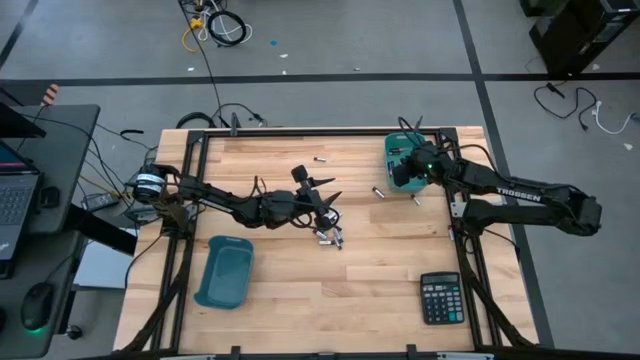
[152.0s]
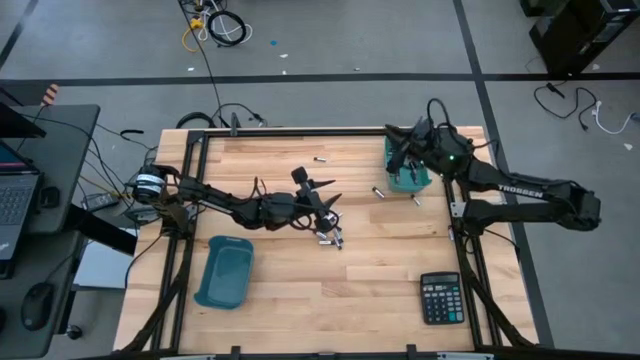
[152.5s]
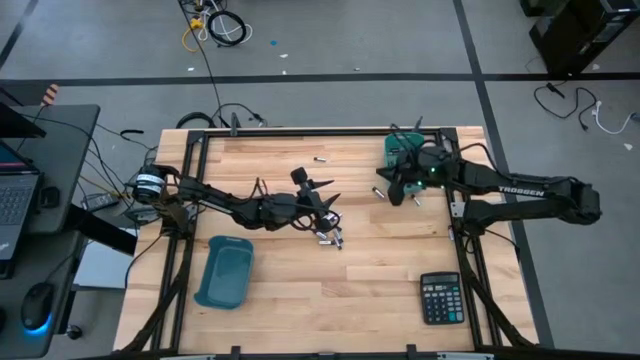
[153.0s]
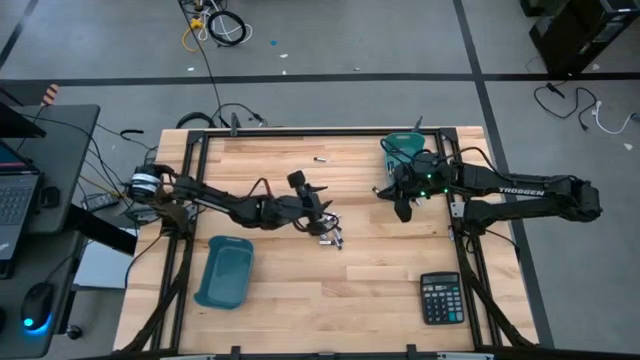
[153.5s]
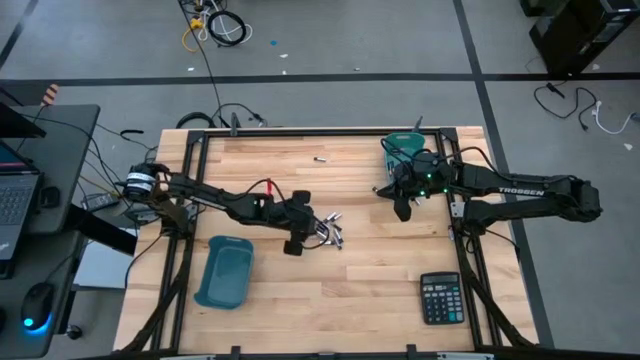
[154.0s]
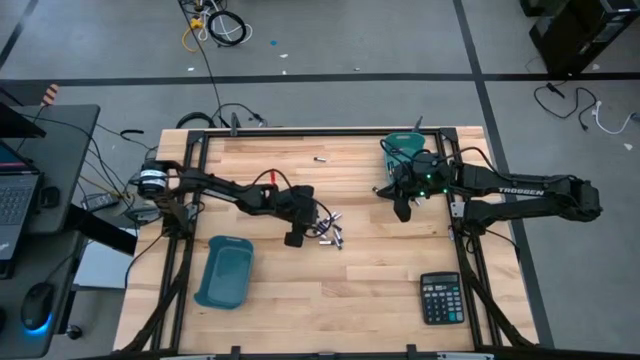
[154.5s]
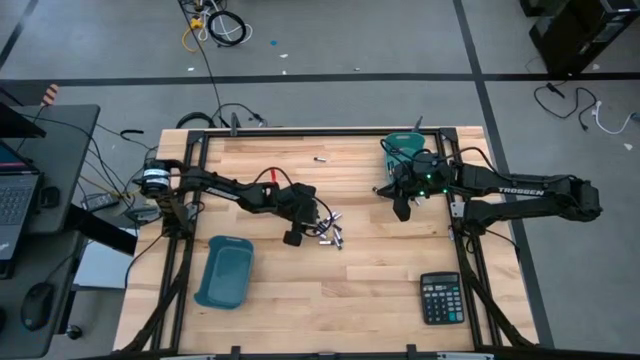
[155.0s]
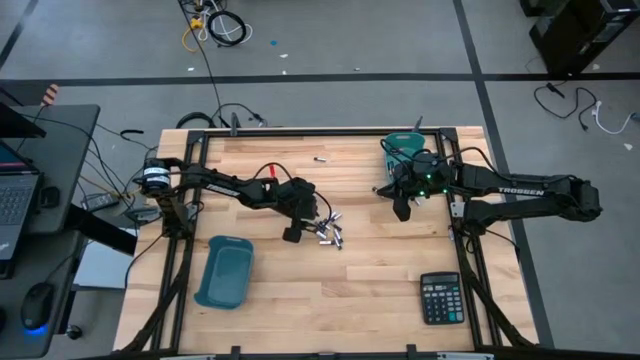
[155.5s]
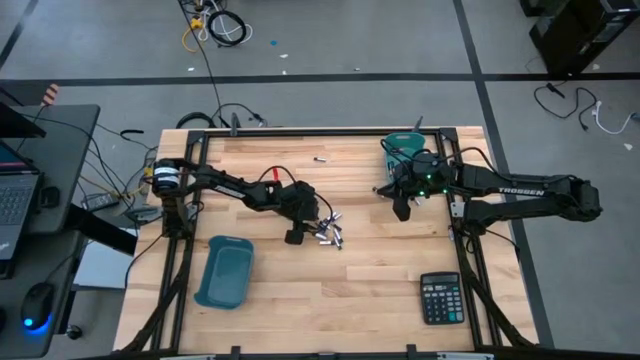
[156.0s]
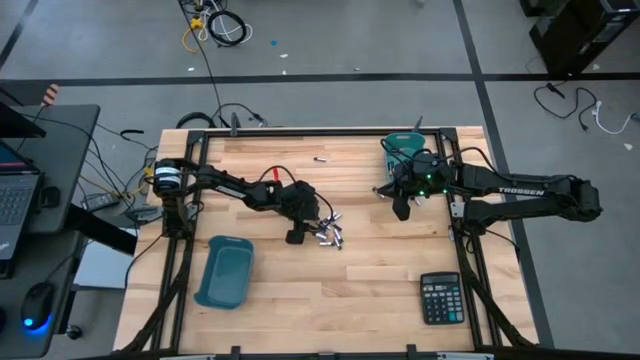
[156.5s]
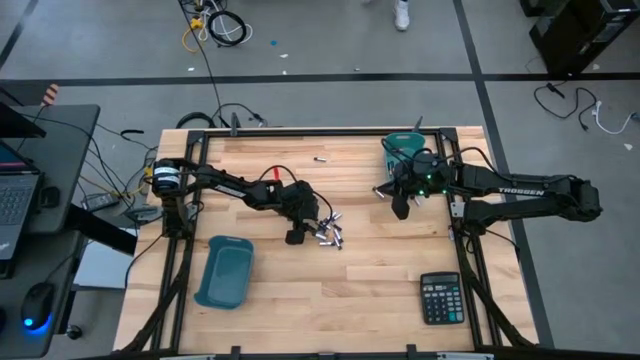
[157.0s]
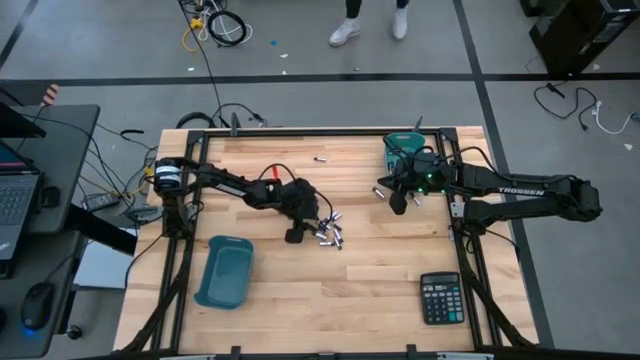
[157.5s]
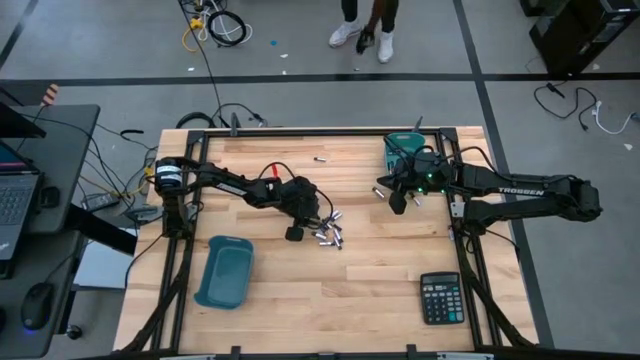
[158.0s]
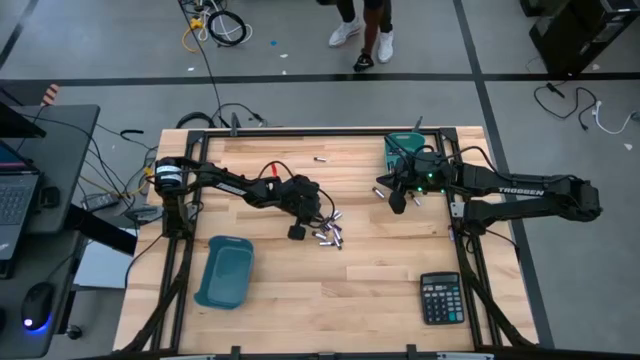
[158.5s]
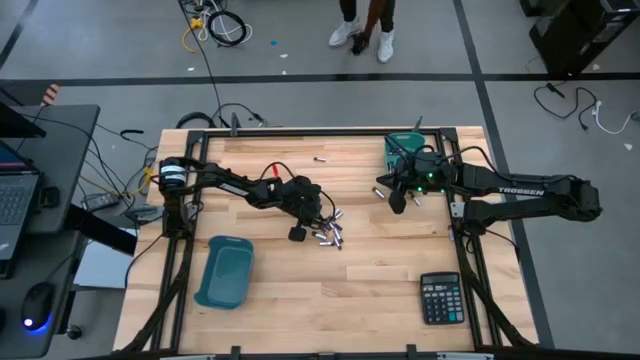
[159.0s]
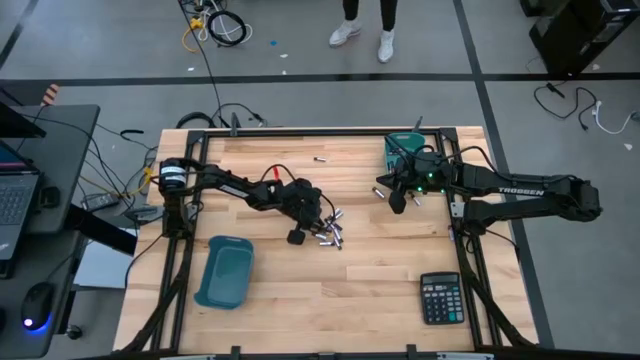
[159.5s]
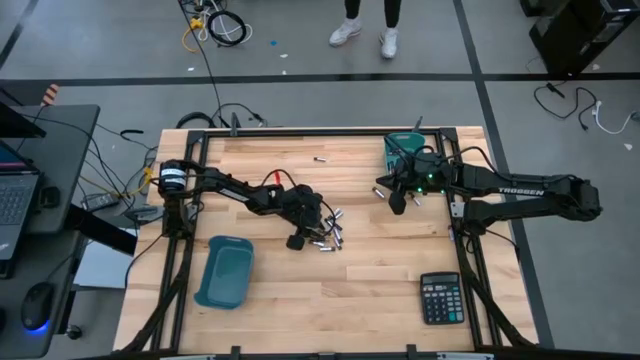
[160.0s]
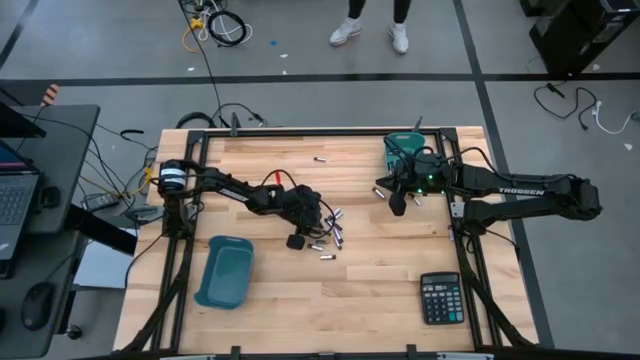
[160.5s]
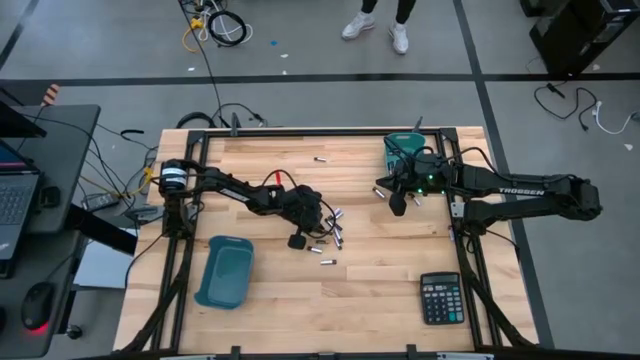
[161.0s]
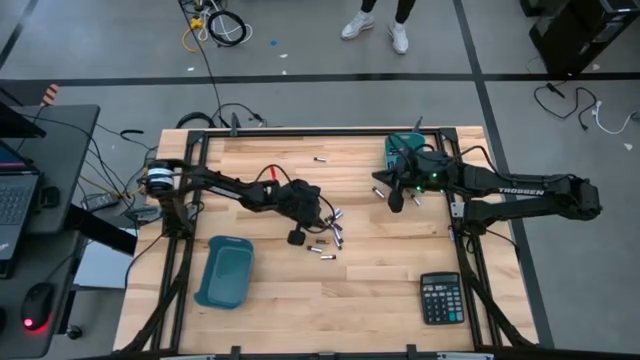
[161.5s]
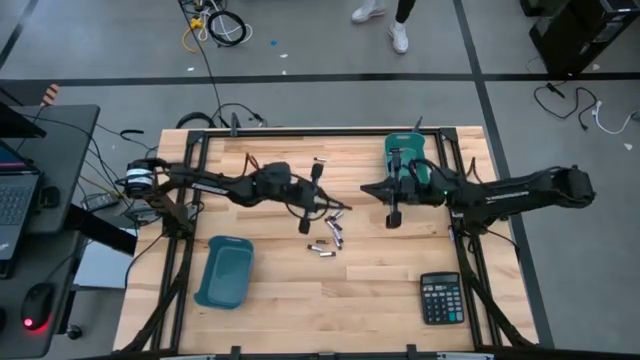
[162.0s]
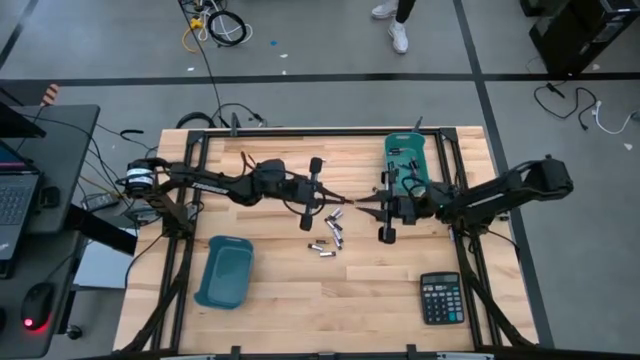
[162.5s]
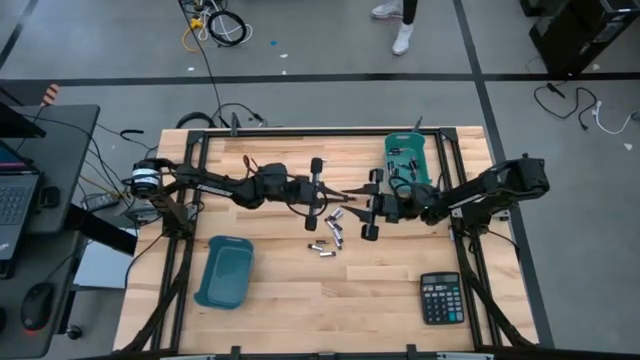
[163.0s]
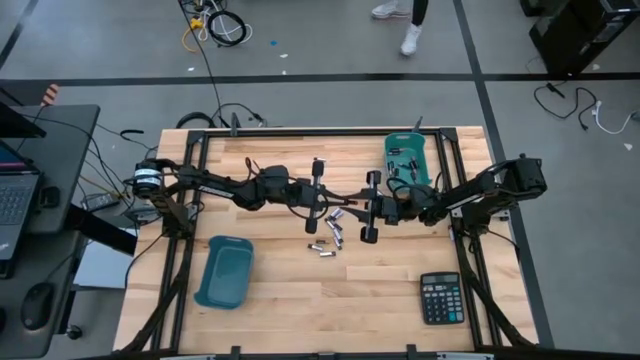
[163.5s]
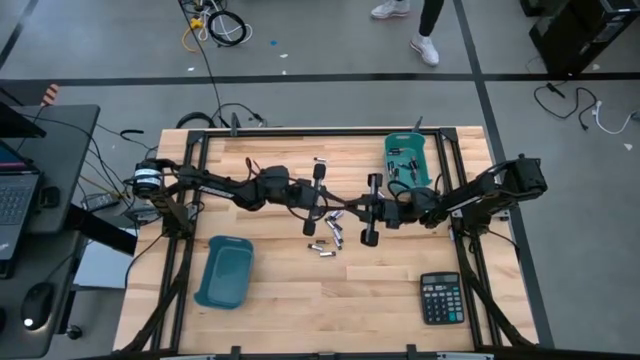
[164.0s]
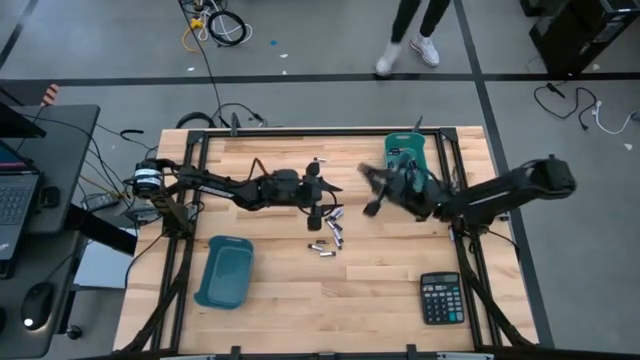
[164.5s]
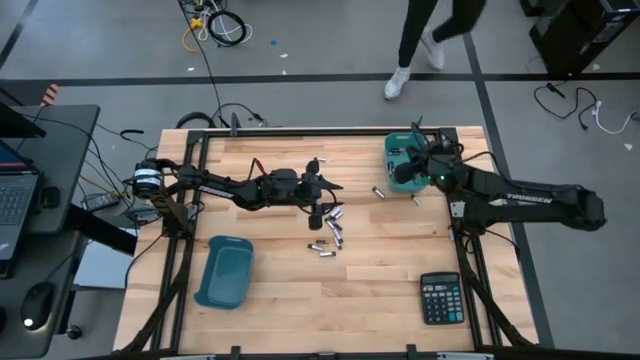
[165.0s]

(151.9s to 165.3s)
Task: Sort batteries
Put the black battery into the green bin

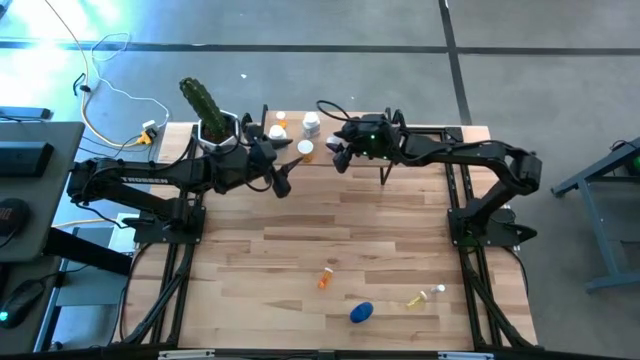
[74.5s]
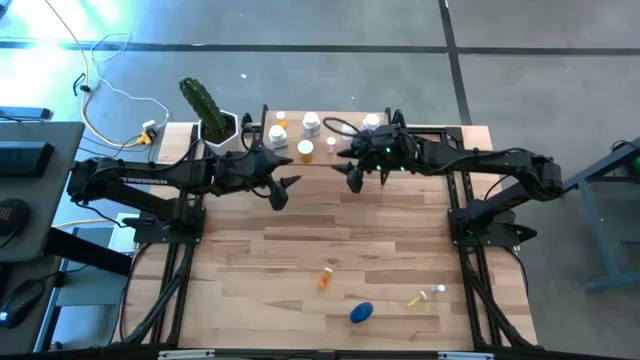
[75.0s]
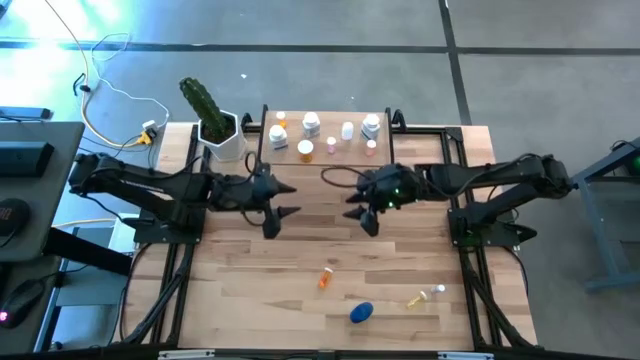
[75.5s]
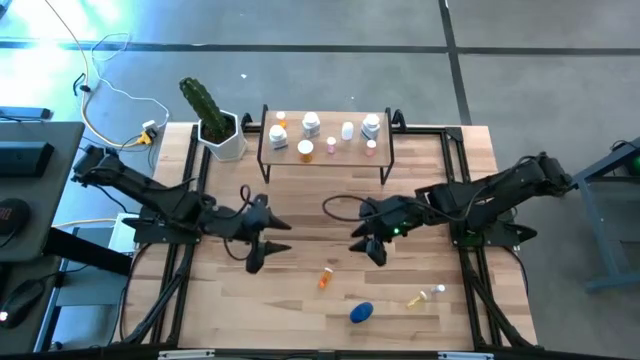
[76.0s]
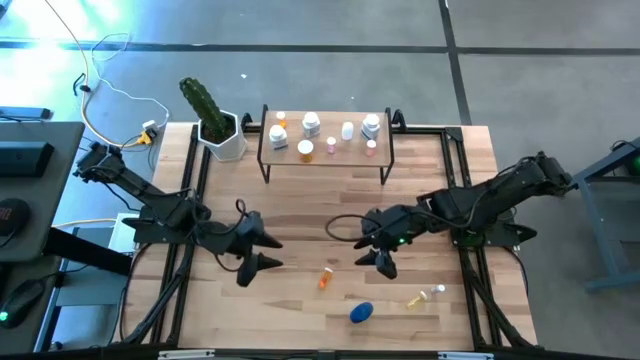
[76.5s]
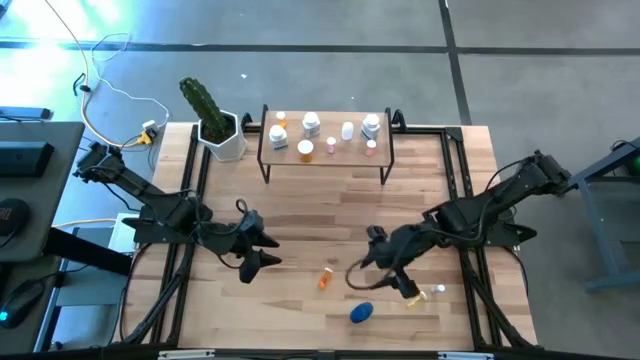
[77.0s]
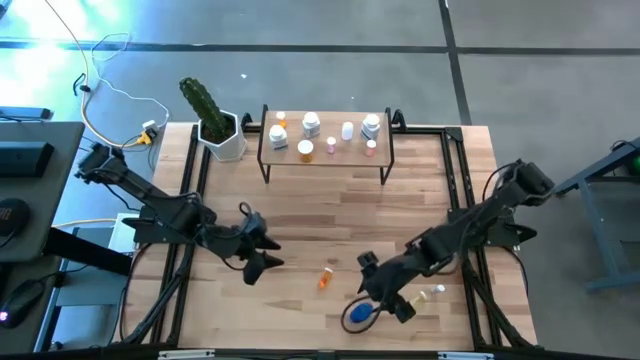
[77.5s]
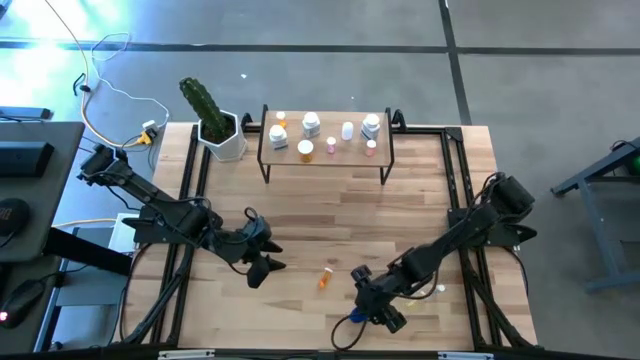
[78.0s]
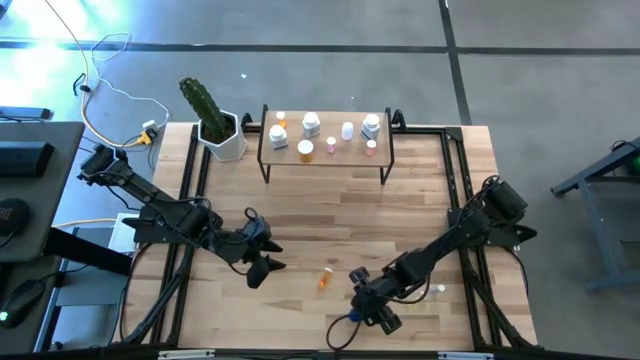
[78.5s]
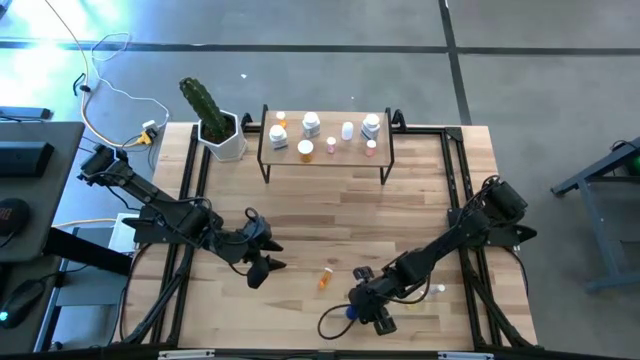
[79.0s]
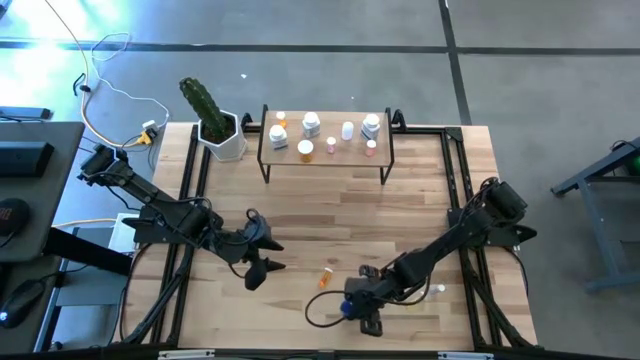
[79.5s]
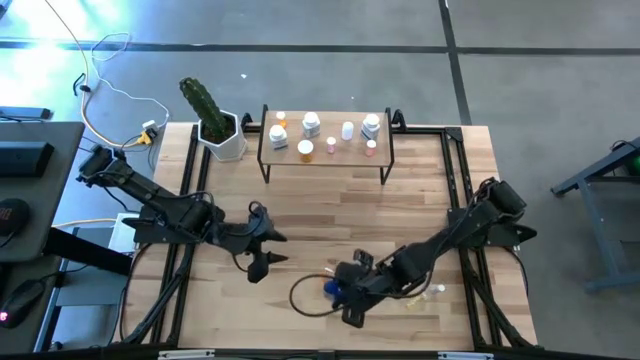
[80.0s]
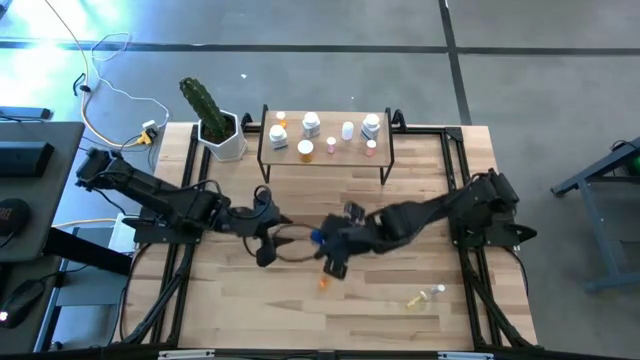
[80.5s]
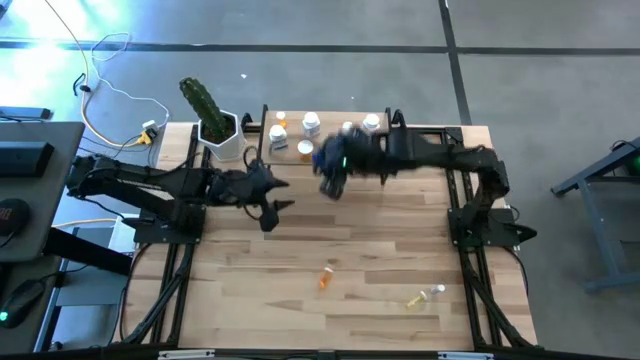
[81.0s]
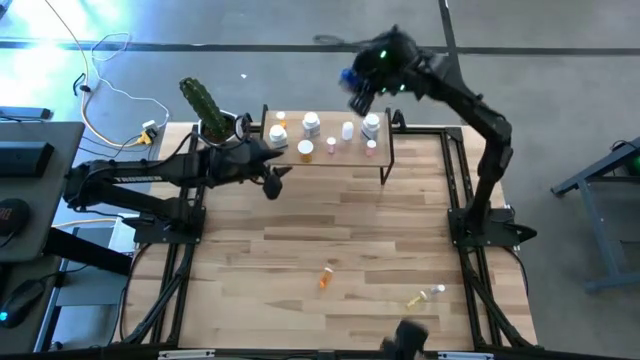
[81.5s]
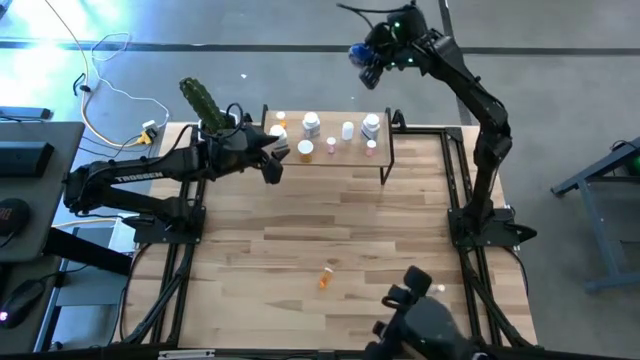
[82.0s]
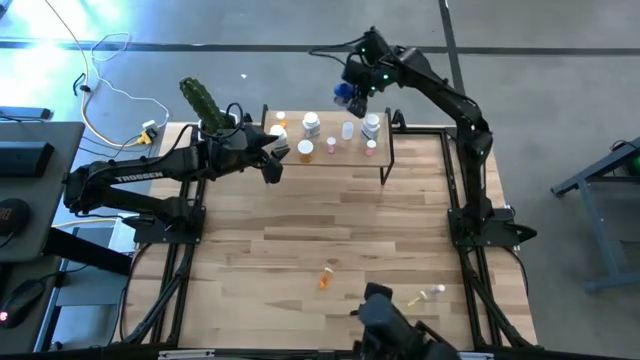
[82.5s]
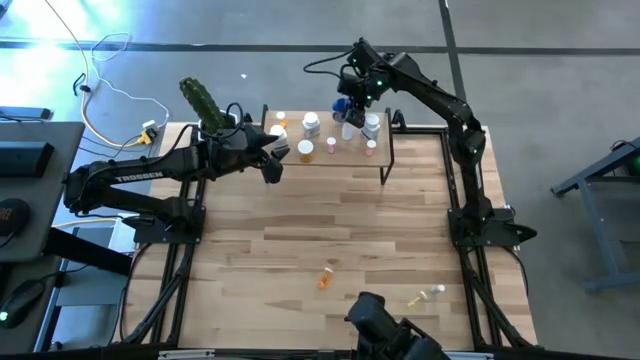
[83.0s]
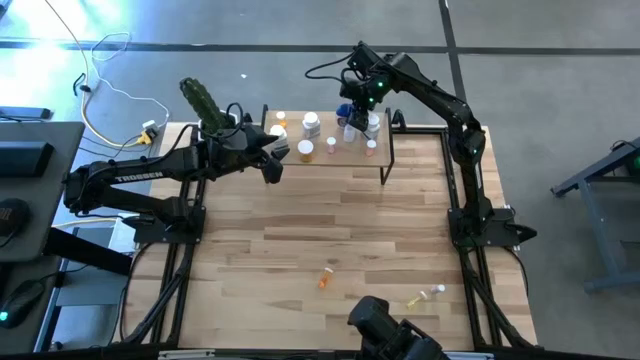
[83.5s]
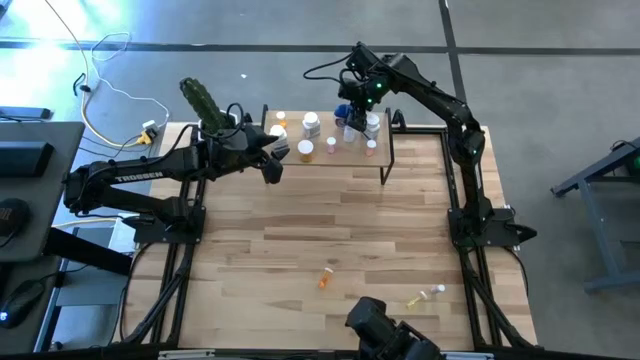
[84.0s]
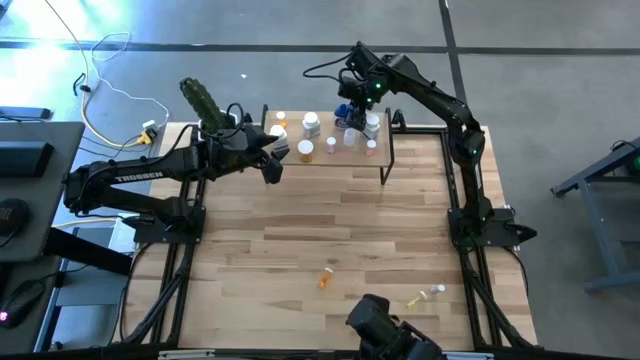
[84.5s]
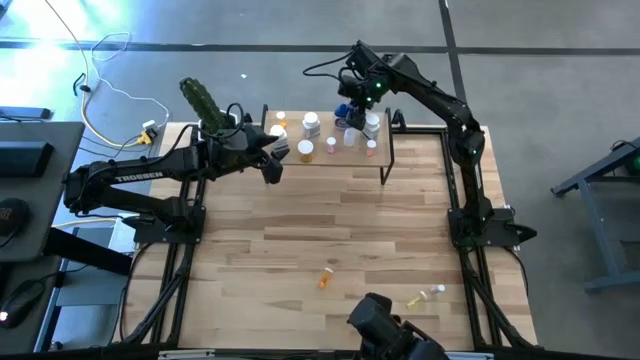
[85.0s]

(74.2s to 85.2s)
Task: Pick and place medicine bottles onto shelf by color
Put the blue pill bottle on the shelf
